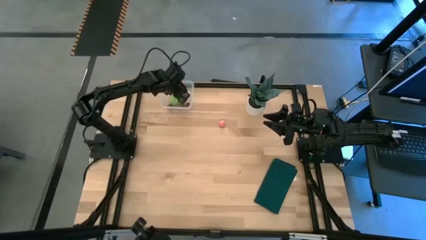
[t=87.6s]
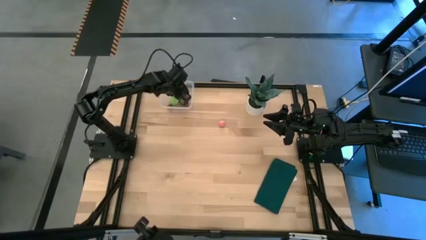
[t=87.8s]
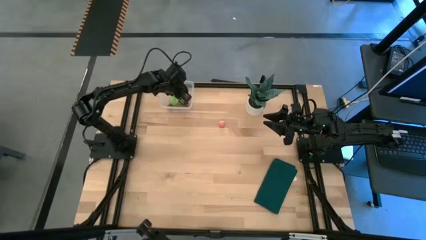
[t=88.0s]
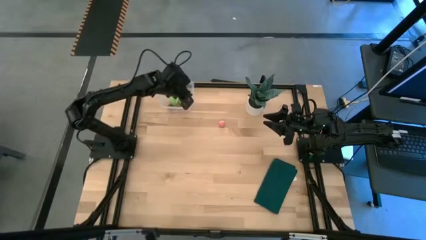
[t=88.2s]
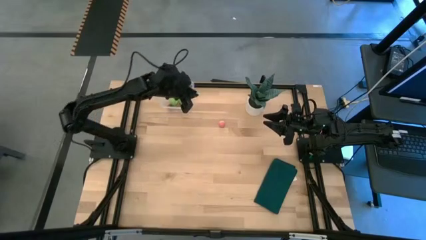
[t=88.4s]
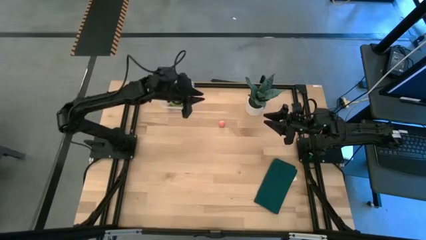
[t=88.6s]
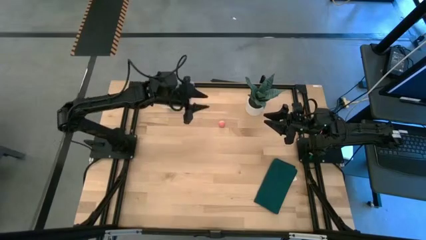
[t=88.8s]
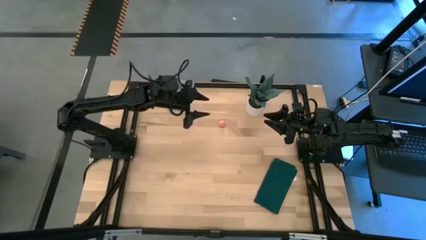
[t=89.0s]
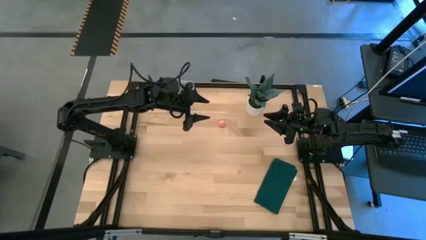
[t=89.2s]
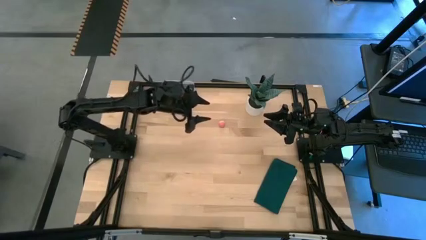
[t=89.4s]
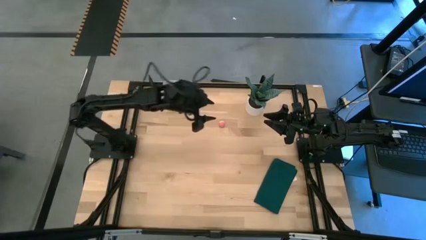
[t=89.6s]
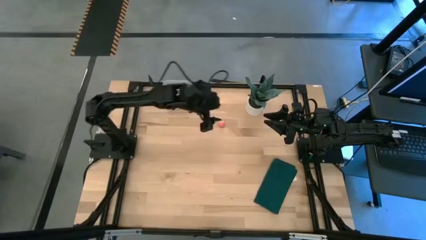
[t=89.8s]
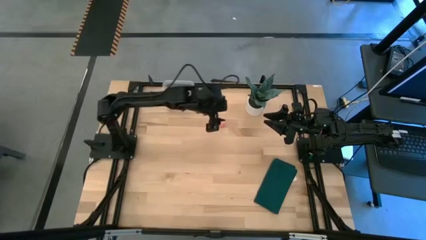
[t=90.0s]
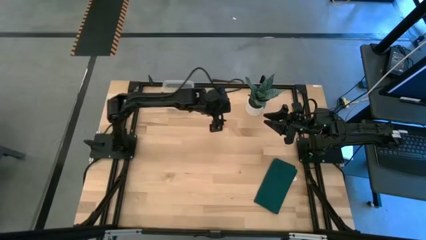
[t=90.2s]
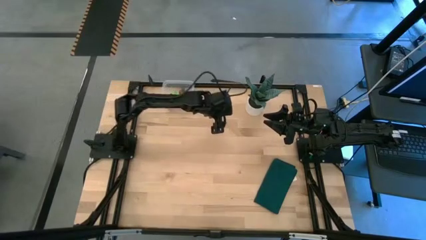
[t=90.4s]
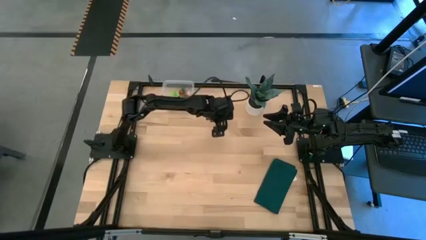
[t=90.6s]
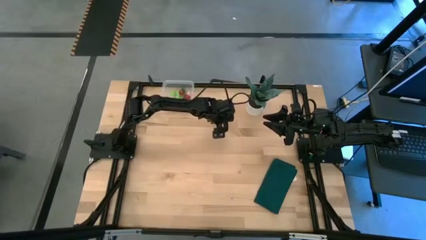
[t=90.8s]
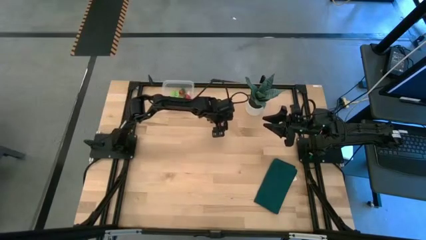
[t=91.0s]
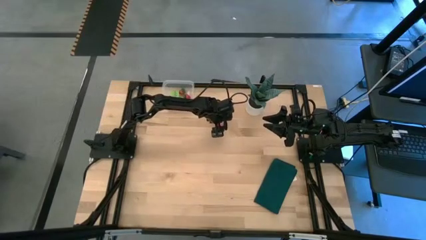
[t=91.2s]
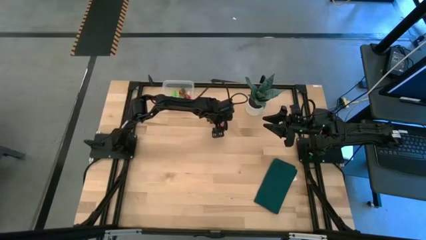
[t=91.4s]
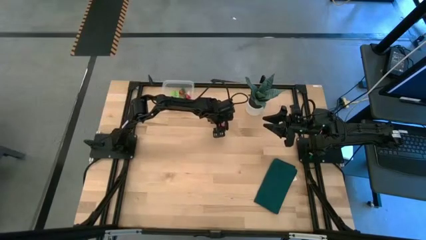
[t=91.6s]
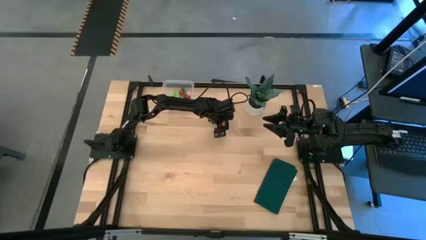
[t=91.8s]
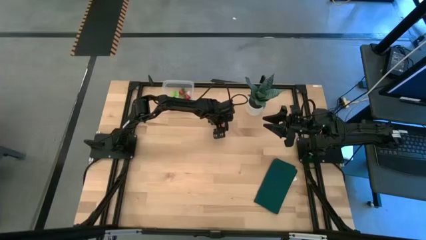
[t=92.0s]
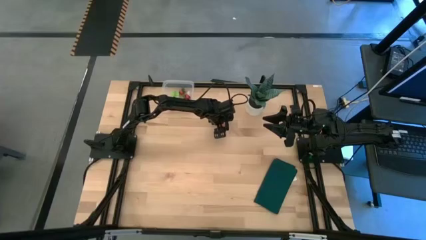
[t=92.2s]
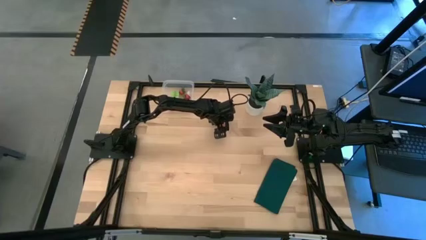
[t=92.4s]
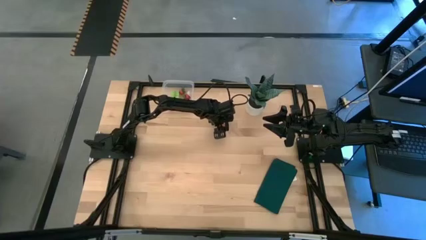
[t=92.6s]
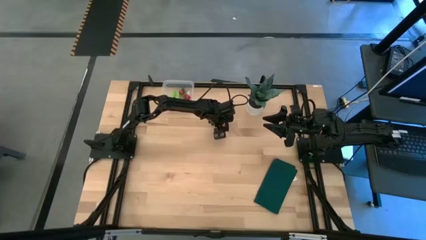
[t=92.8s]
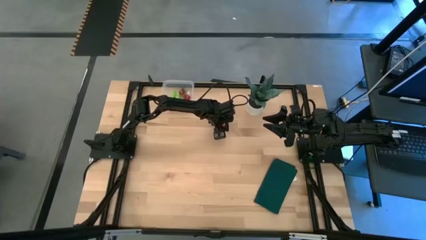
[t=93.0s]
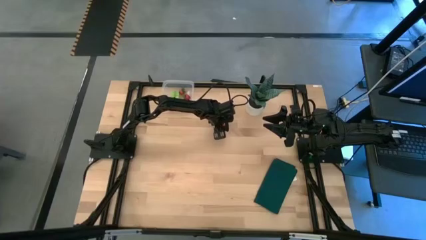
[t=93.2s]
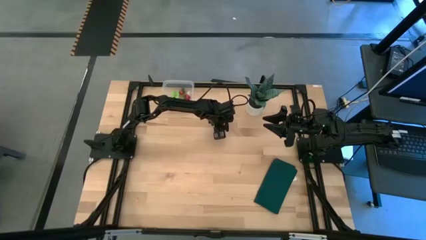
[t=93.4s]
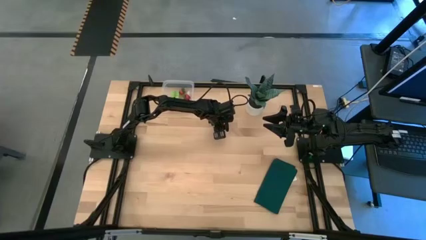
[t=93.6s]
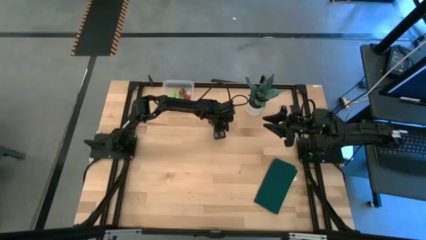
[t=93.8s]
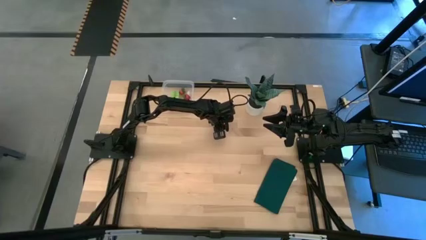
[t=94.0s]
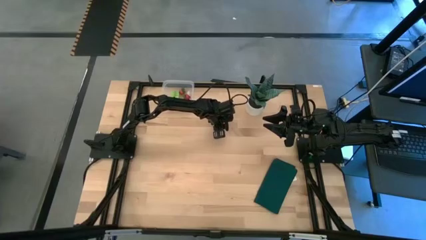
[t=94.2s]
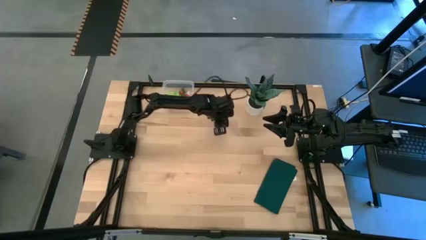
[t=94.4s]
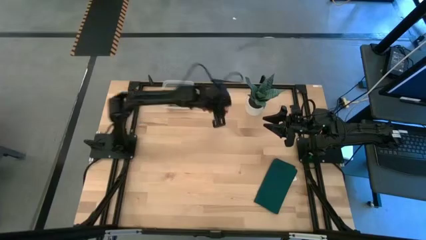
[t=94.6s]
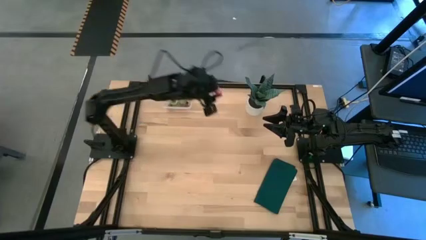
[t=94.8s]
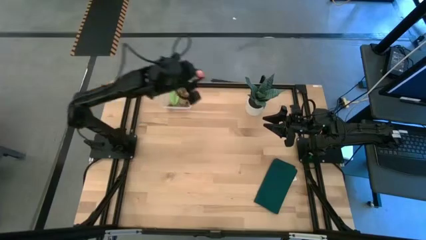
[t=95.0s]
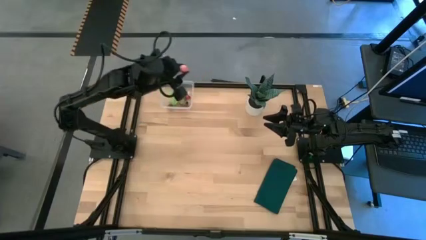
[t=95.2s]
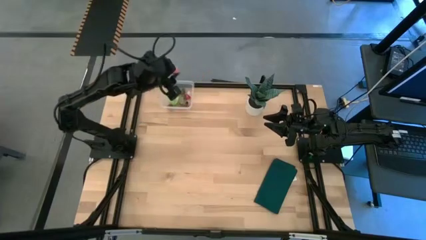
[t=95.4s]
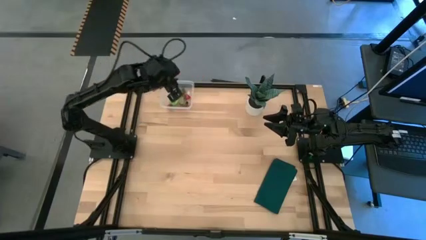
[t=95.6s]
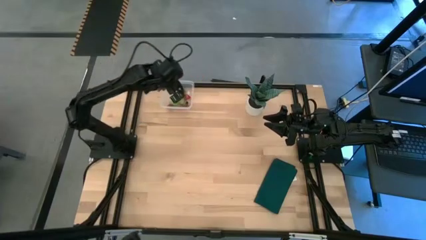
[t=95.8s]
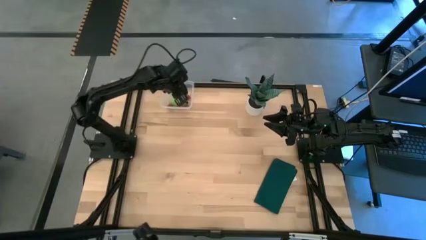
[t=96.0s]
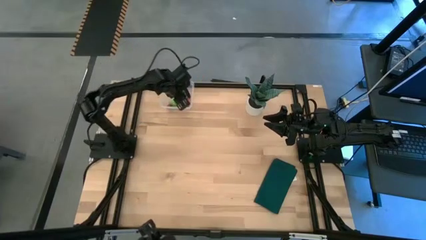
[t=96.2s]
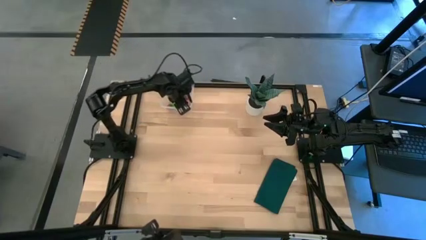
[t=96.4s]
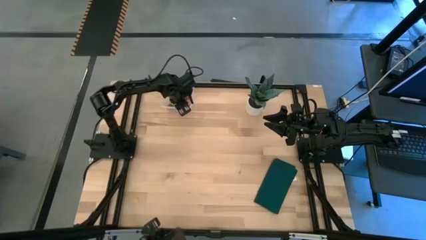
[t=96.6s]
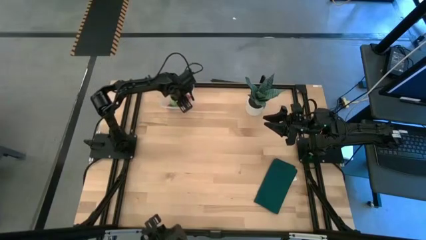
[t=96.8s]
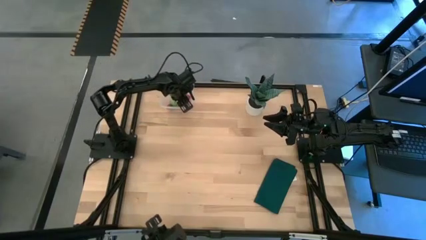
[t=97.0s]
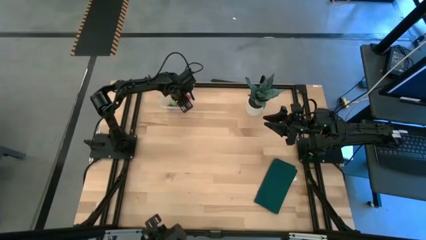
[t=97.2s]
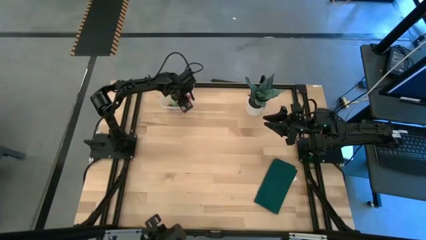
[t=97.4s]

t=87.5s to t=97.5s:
Task: Pick and placing Produce into tupperware
Put the pink peach into the transparent container

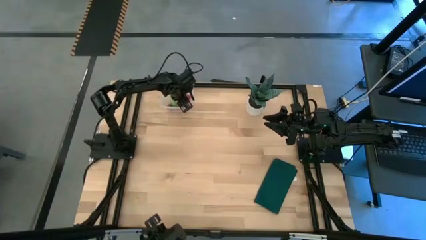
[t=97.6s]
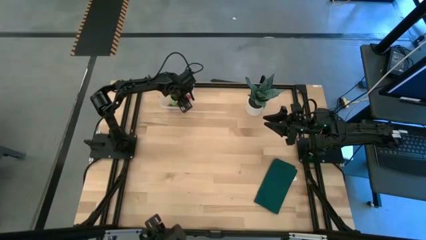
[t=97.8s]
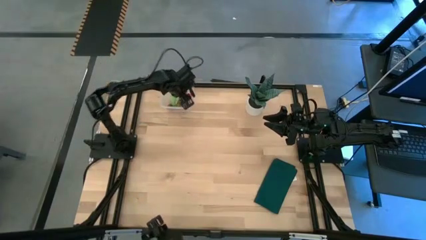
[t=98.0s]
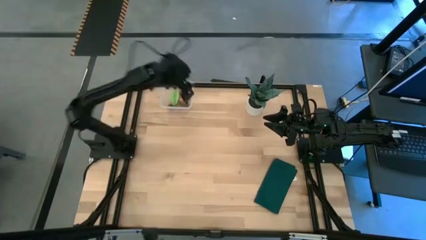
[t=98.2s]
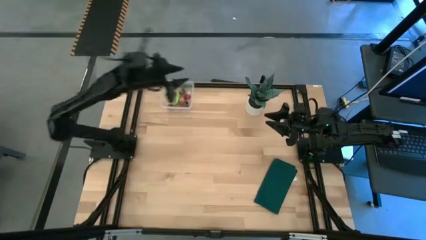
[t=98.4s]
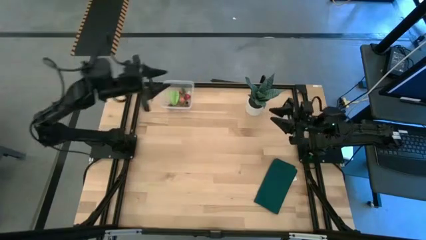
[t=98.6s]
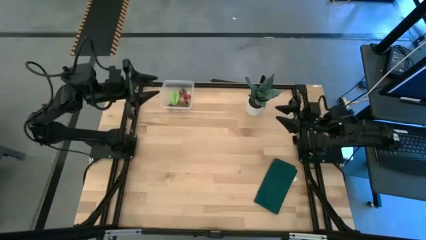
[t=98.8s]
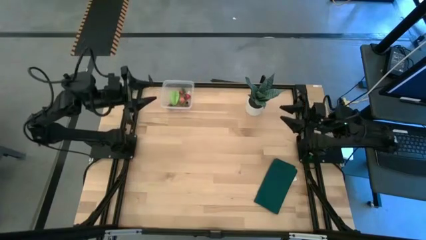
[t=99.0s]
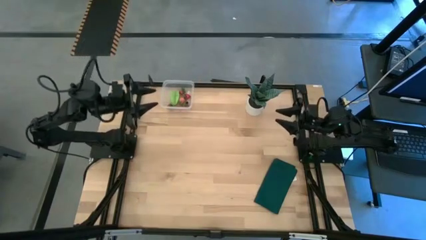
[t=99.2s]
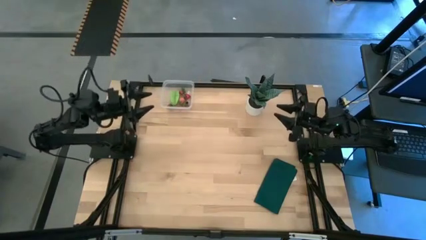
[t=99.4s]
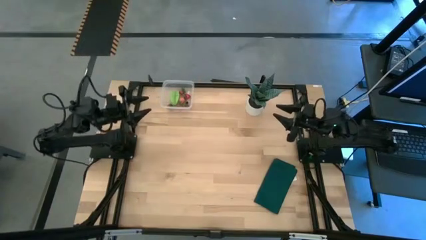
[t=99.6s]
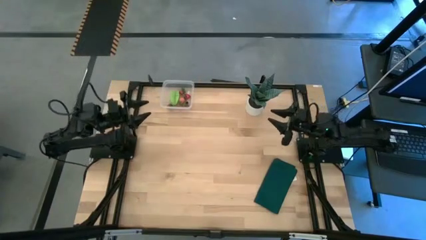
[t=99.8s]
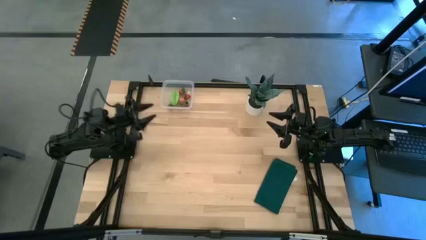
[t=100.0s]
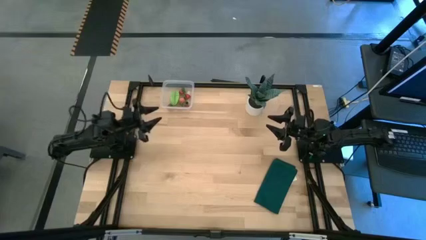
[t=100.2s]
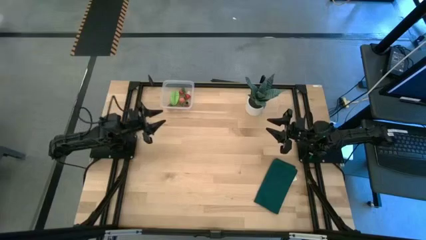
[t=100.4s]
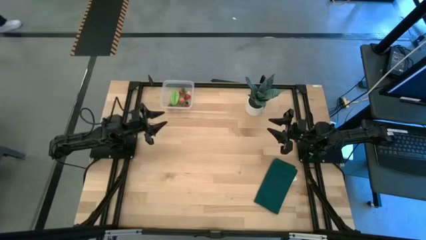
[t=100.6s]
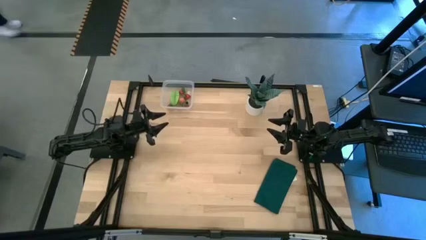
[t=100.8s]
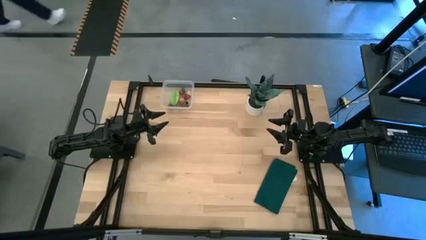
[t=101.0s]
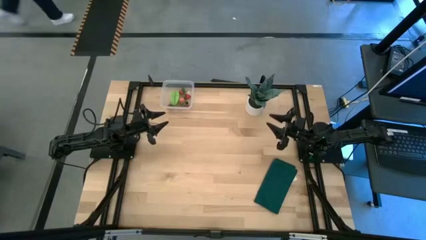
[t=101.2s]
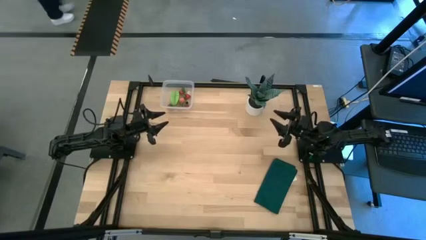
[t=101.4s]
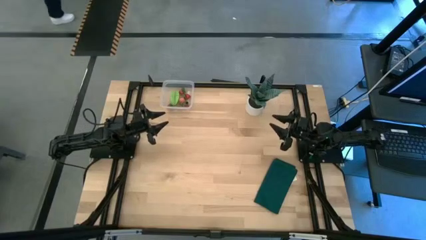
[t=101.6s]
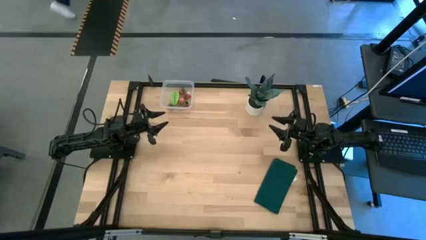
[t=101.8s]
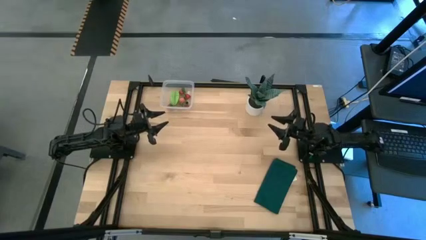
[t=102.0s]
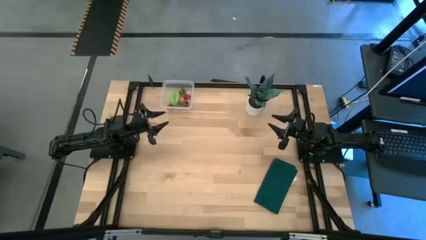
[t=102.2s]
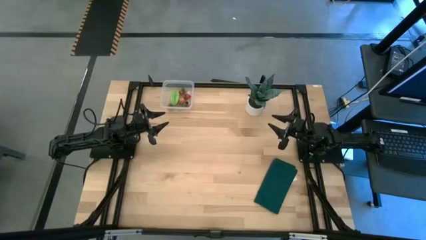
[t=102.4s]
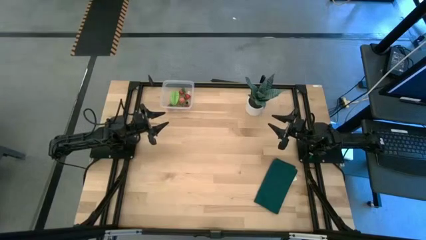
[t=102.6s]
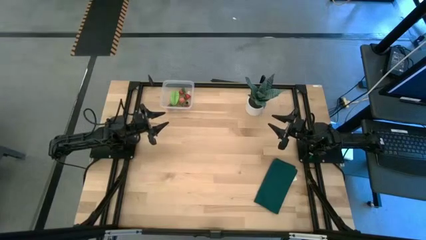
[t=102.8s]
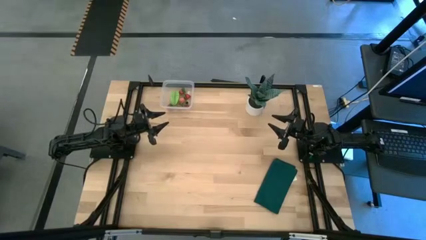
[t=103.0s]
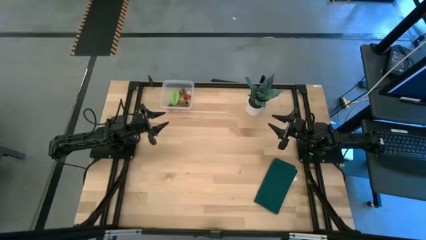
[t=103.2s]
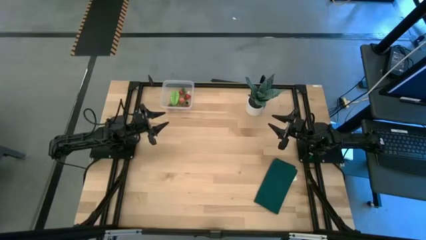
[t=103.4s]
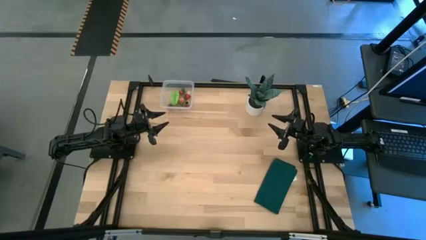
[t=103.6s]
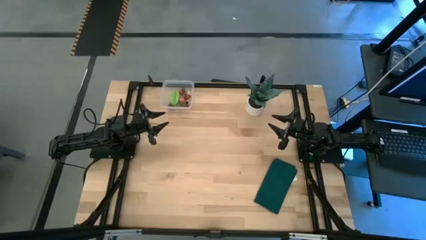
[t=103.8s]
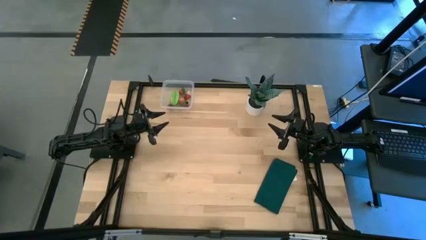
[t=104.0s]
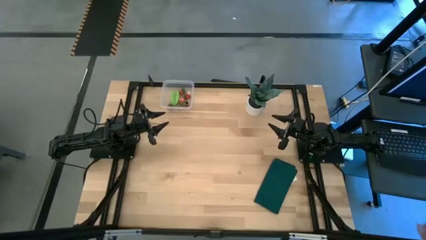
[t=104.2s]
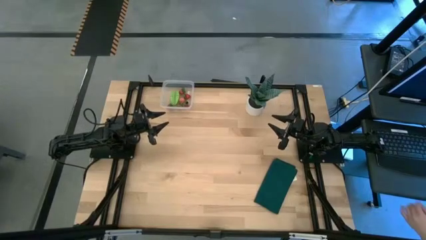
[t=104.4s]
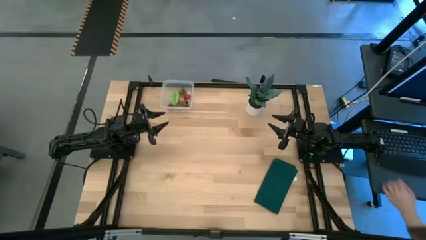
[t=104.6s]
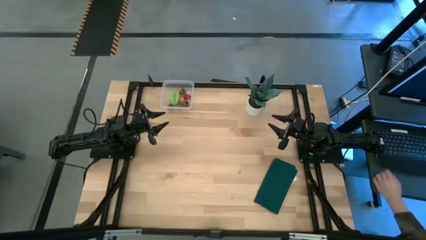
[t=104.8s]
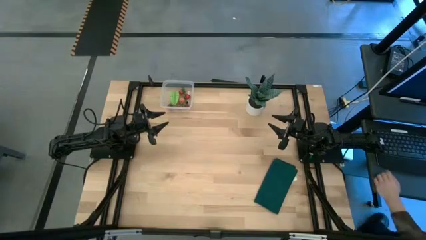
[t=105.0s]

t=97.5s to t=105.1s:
Return to Home Position
